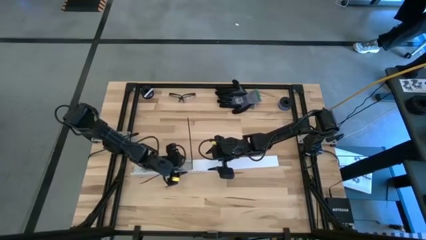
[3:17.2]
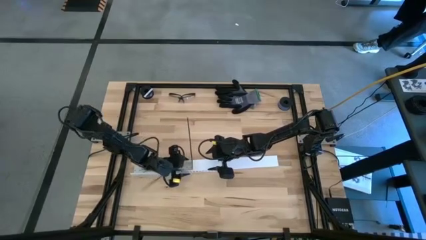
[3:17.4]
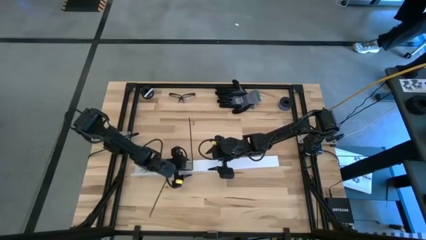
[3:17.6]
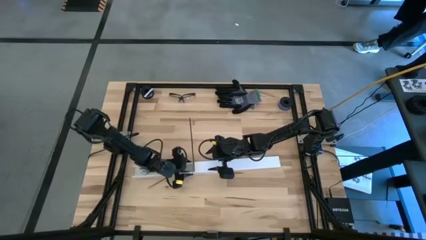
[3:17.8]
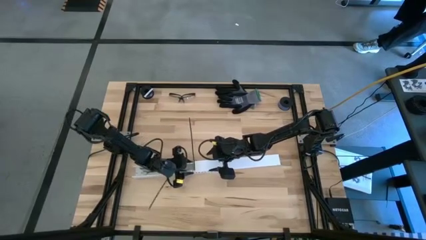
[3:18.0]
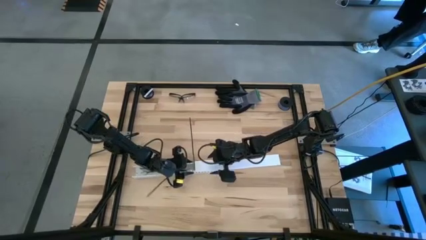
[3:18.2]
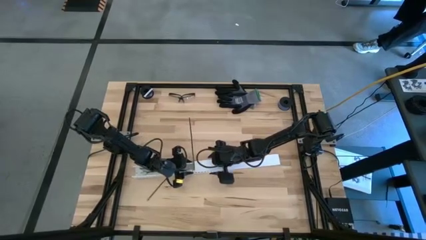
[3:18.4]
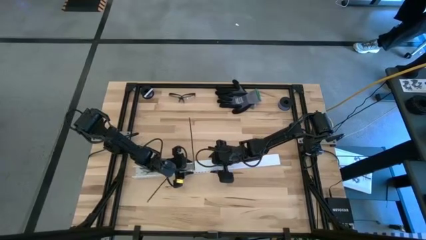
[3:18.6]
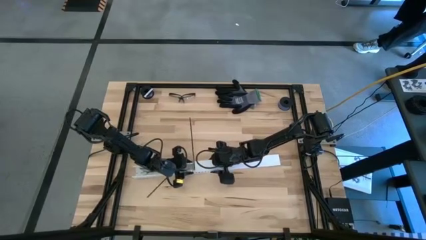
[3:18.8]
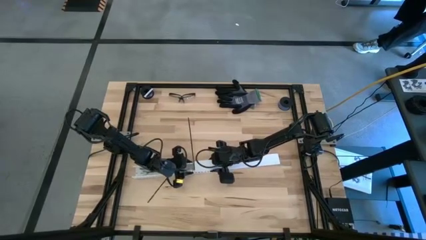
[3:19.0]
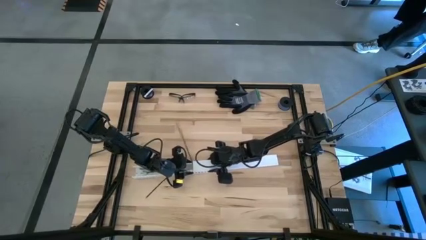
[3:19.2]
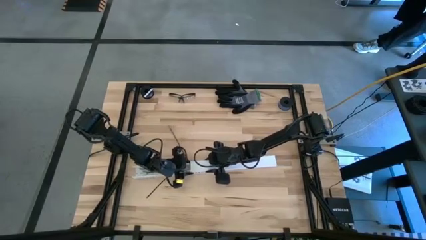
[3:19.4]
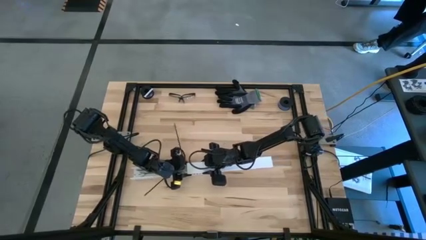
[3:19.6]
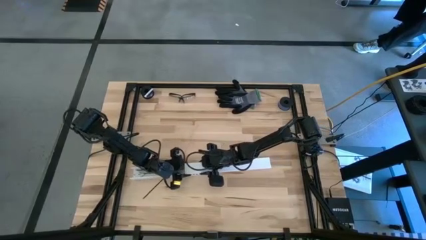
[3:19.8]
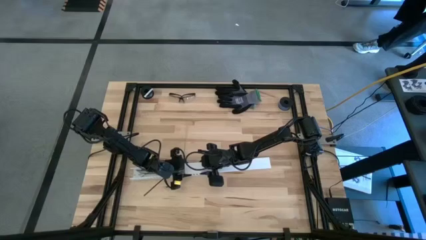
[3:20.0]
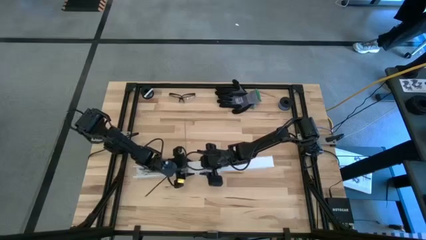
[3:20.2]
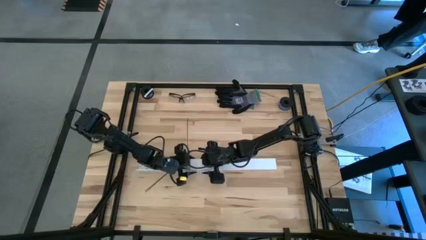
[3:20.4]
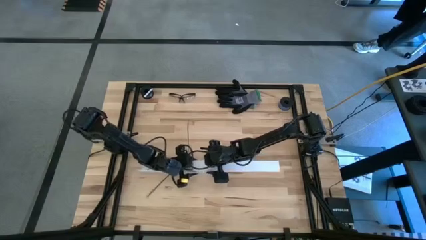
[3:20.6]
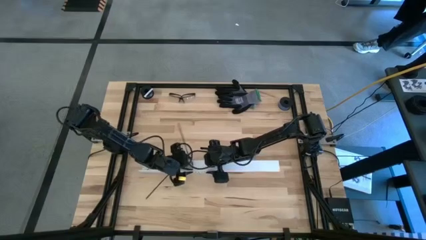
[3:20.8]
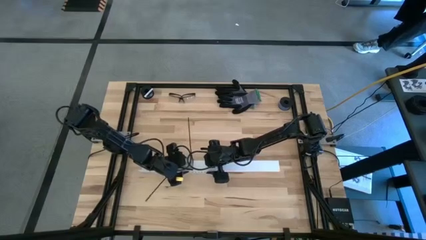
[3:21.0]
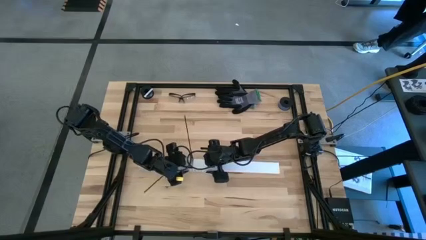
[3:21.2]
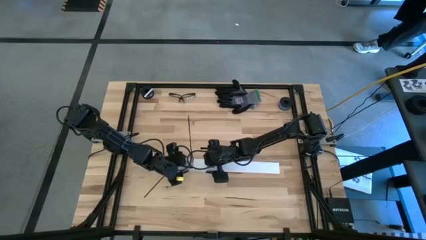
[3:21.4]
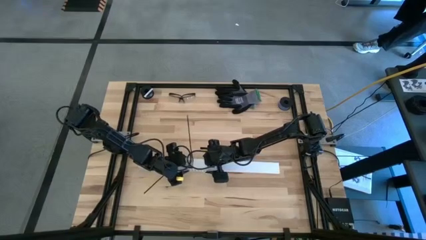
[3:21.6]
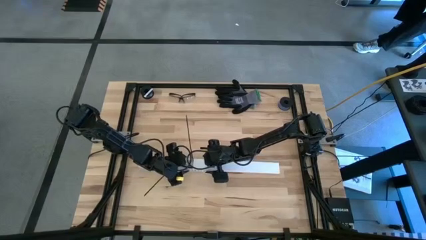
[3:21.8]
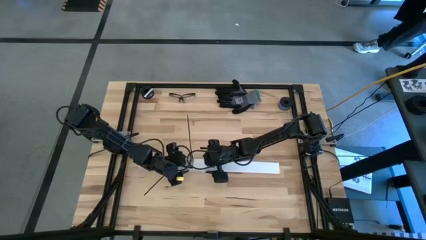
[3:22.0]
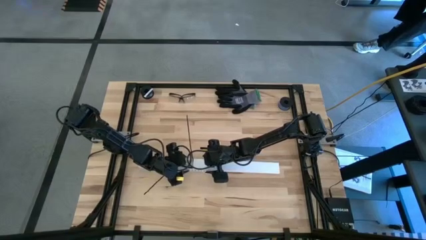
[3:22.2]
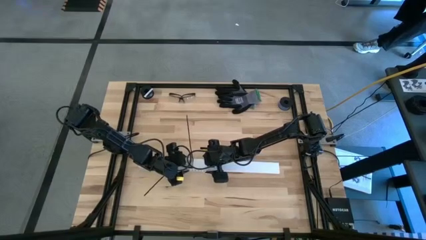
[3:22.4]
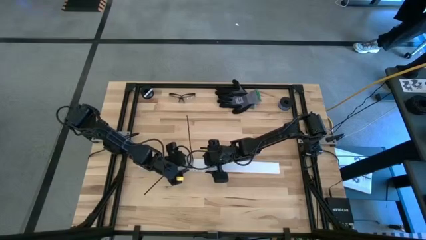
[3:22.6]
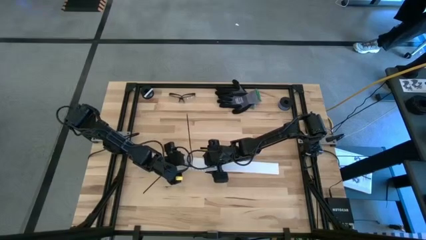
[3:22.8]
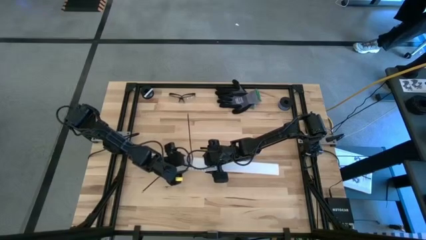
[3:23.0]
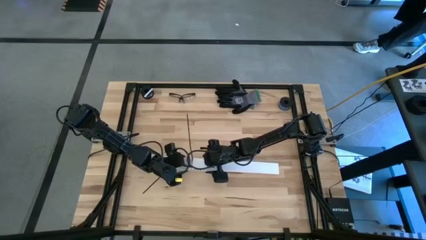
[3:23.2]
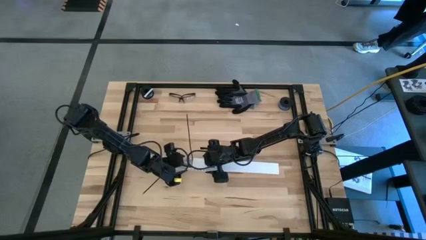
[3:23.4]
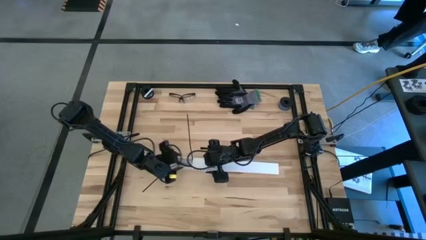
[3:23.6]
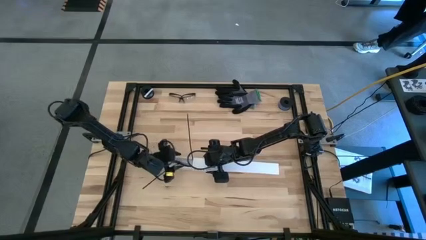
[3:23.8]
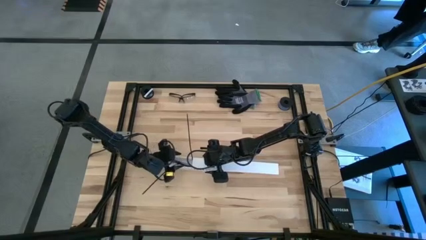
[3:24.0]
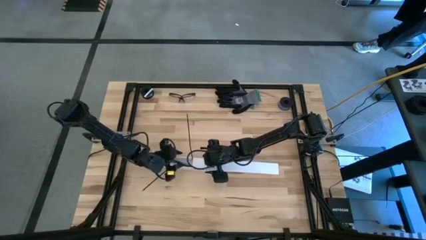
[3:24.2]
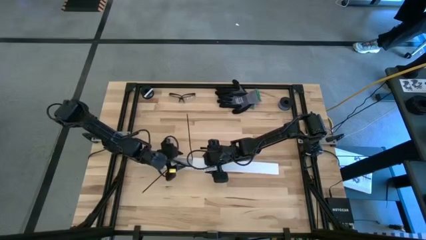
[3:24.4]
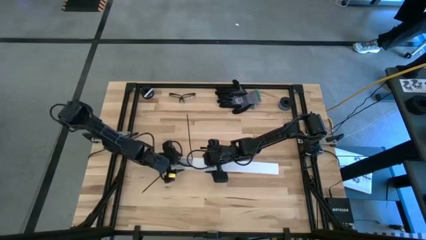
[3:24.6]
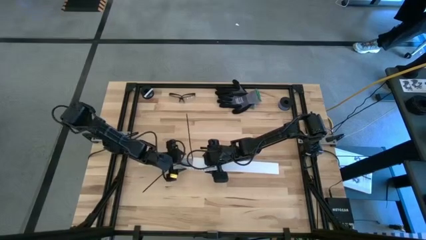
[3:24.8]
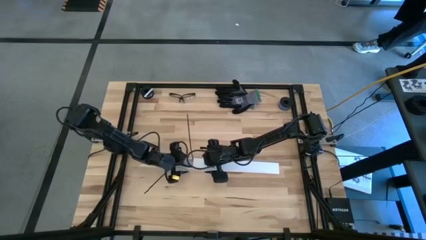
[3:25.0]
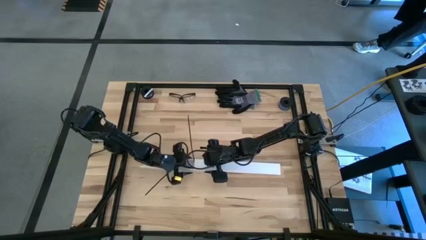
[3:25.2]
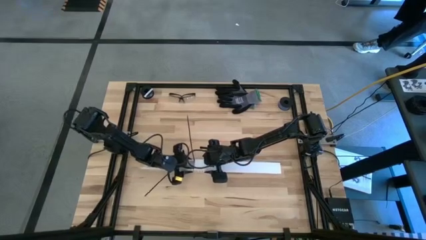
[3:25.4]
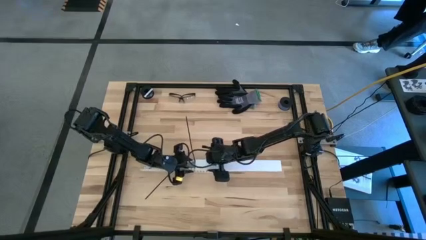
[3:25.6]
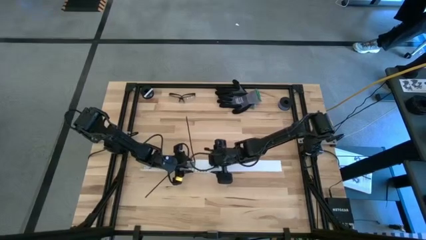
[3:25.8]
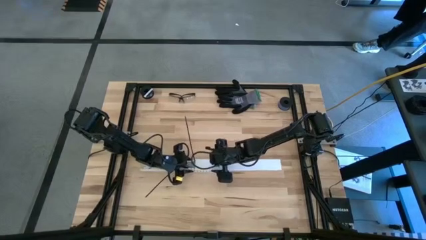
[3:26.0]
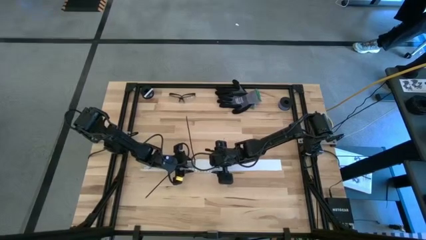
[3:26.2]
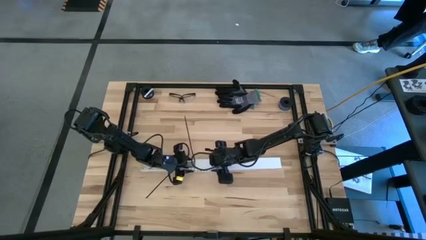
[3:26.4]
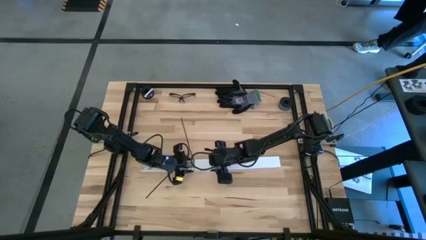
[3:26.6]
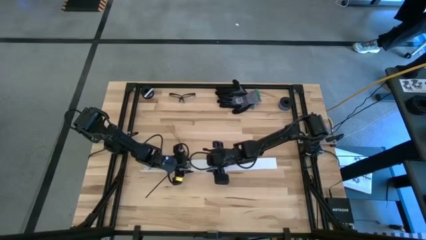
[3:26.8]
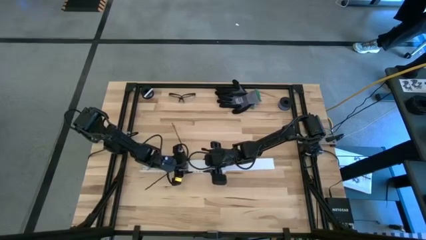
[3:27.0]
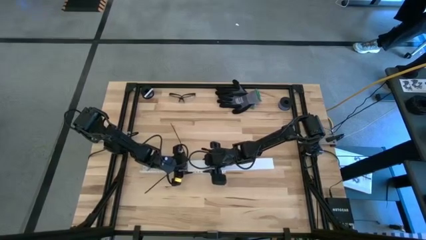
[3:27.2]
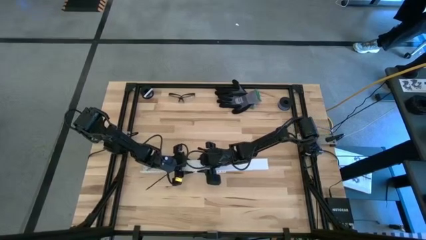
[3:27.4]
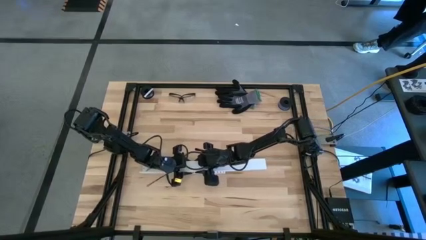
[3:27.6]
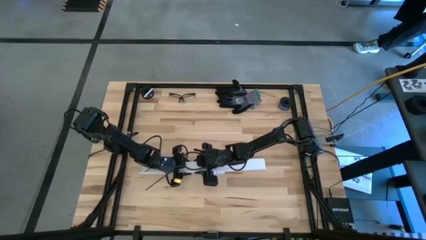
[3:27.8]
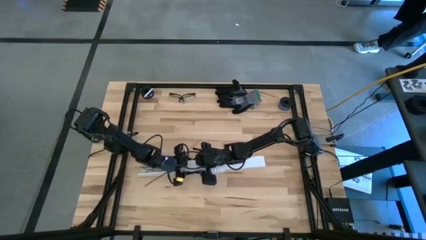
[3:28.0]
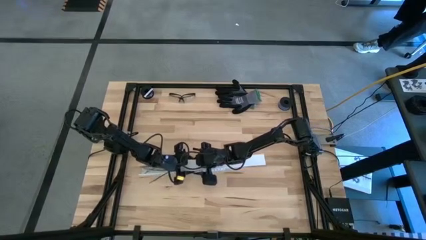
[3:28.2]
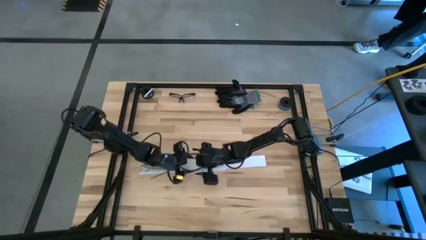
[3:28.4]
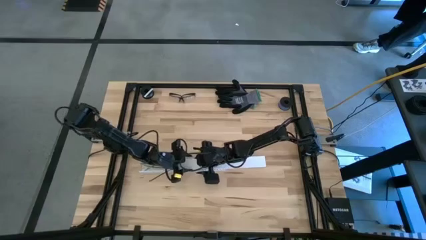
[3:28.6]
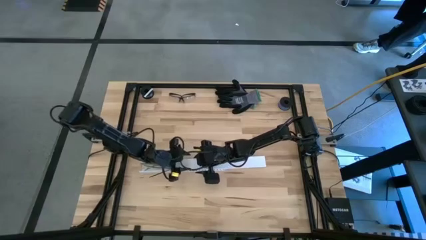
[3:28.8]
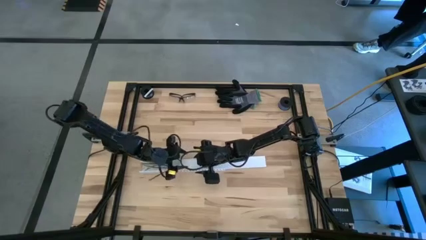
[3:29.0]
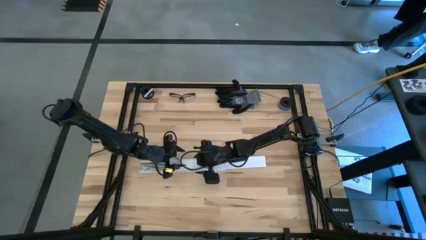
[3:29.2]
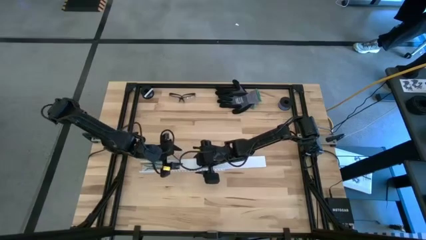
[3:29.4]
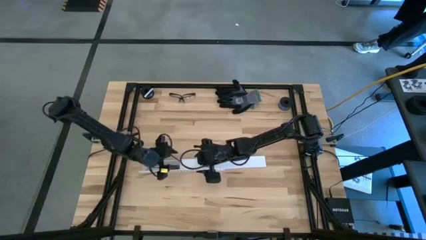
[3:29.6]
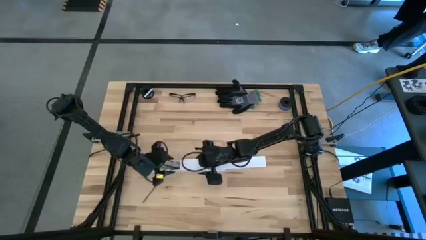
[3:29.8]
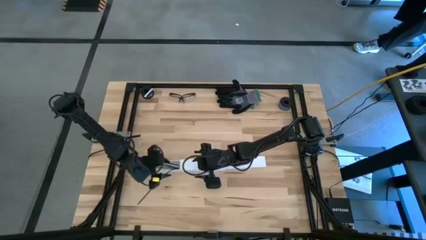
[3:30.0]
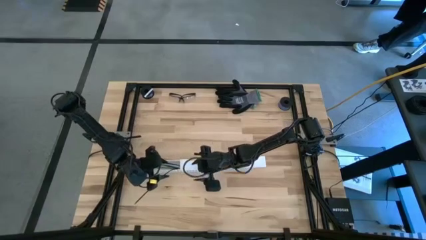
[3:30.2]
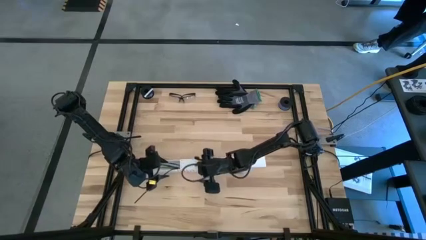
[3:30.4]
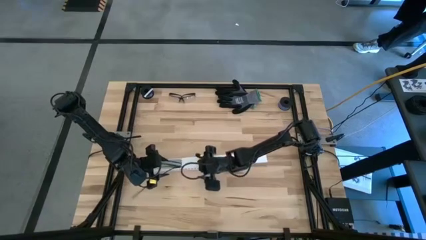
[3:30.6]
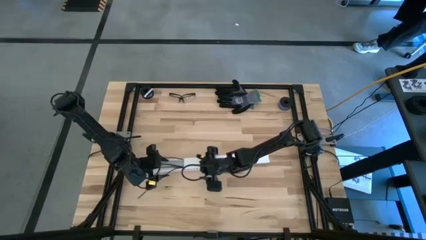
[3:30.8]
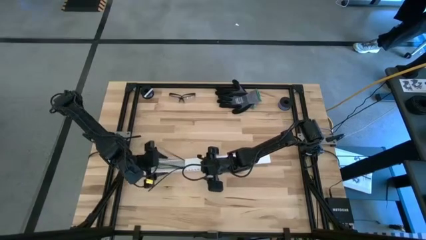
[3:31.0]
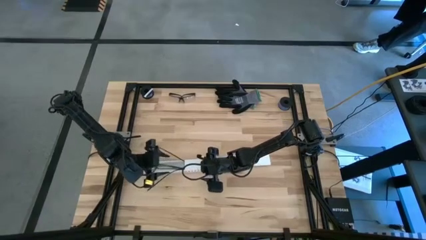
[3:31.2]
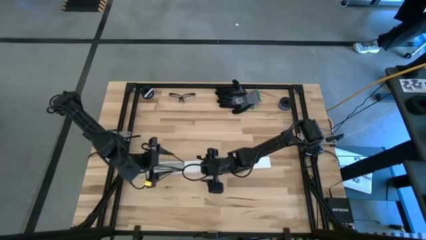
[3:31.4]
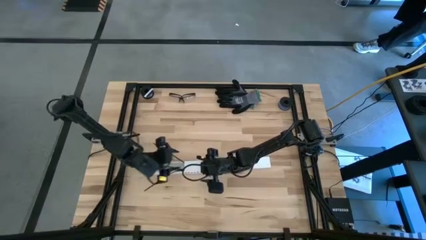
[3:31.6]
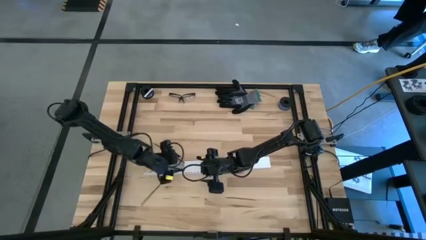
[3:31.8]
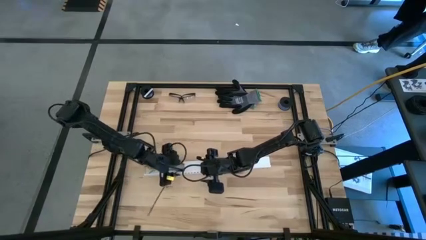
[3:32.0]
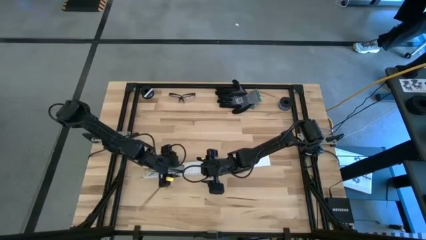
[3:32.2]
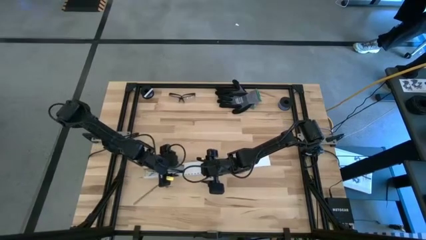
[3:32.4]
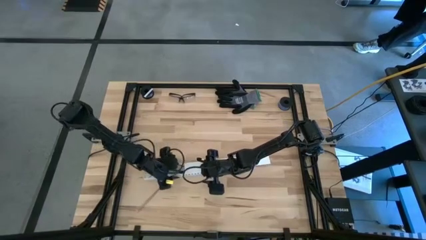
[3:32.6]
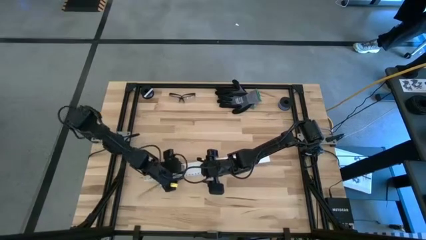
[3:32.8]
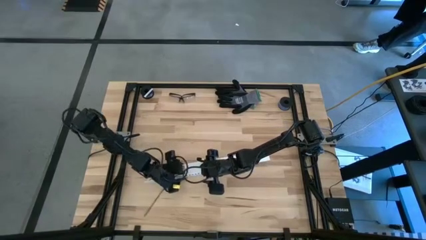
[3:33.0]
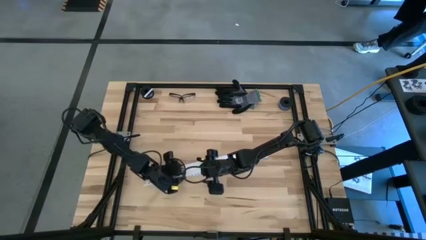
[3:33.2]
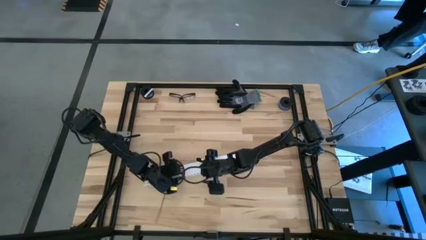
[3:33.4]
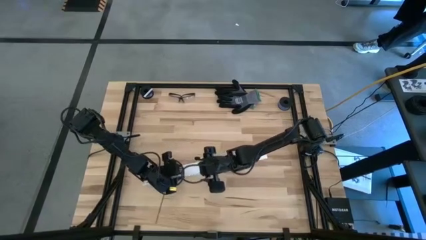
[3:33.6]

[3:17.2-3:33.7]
Task: Ziptie cables
Close the white cable duct
